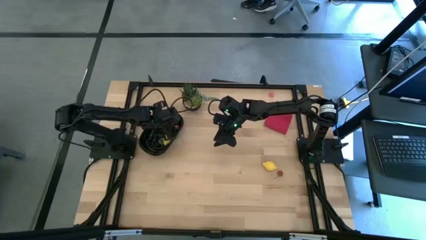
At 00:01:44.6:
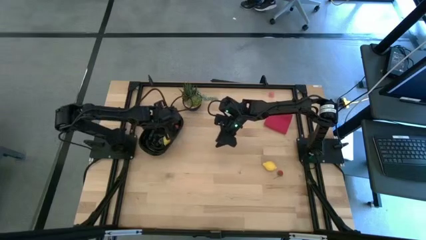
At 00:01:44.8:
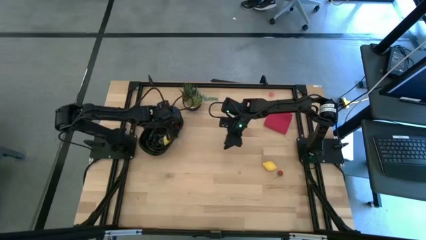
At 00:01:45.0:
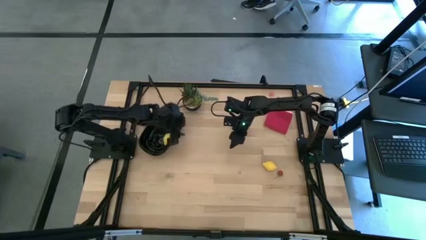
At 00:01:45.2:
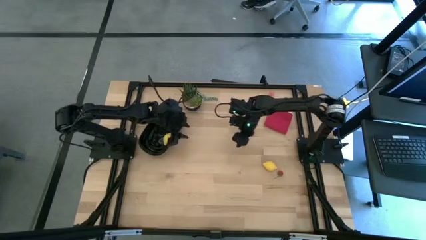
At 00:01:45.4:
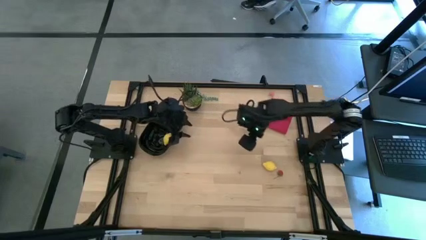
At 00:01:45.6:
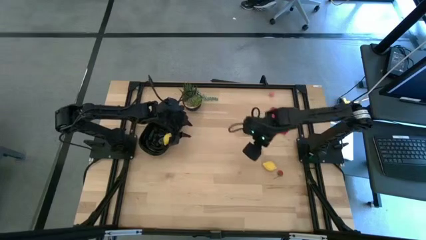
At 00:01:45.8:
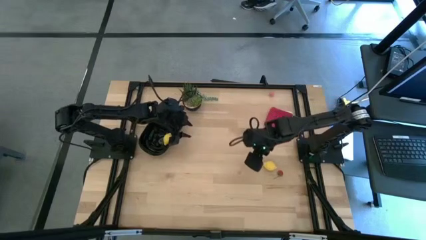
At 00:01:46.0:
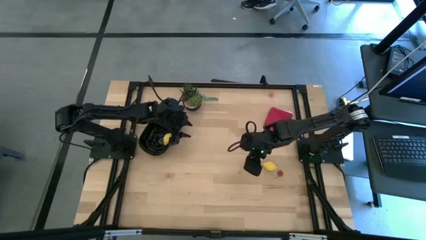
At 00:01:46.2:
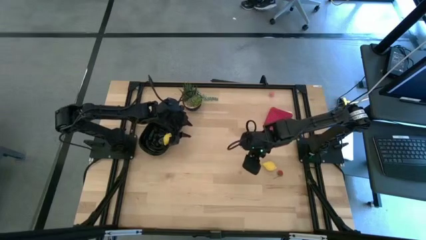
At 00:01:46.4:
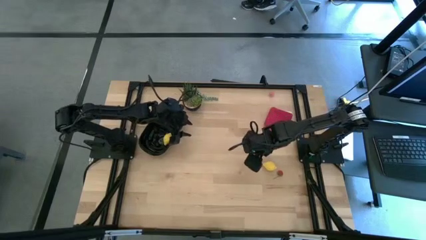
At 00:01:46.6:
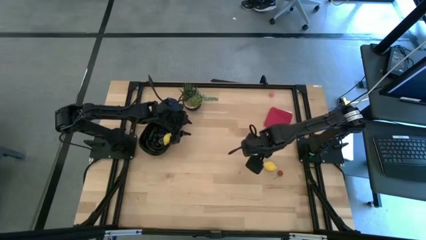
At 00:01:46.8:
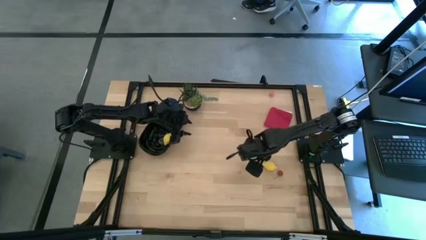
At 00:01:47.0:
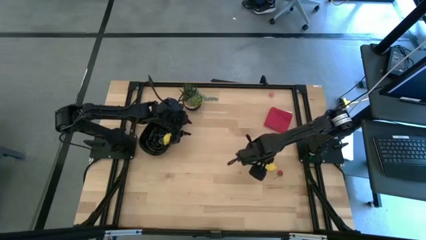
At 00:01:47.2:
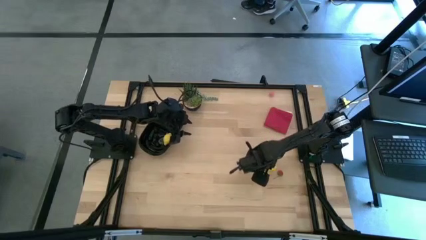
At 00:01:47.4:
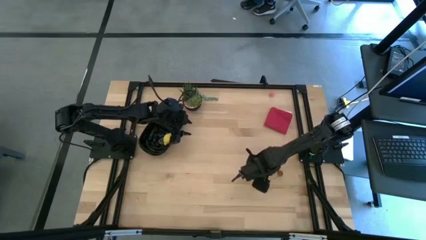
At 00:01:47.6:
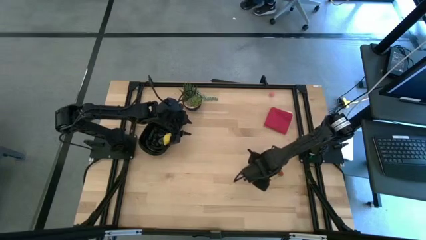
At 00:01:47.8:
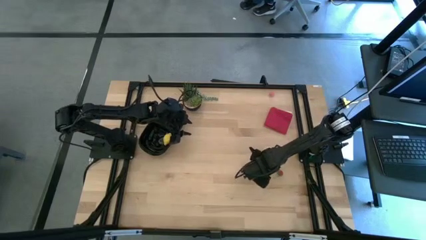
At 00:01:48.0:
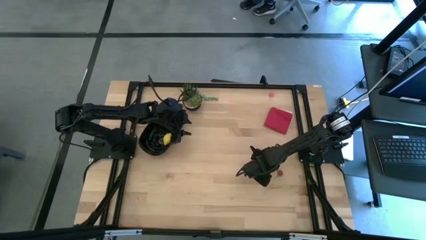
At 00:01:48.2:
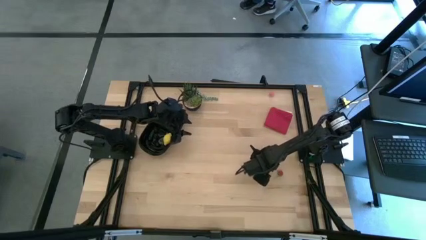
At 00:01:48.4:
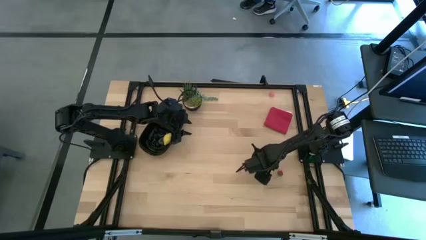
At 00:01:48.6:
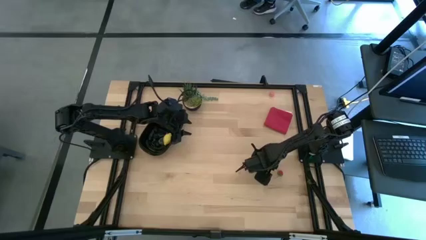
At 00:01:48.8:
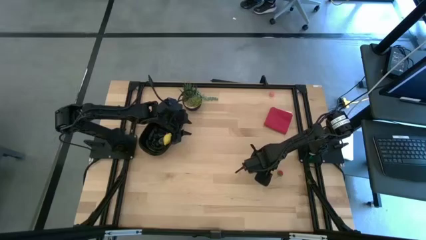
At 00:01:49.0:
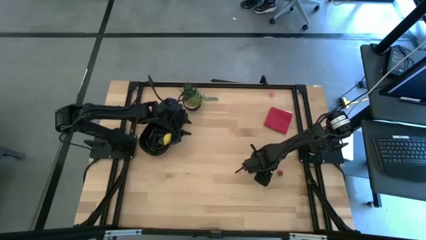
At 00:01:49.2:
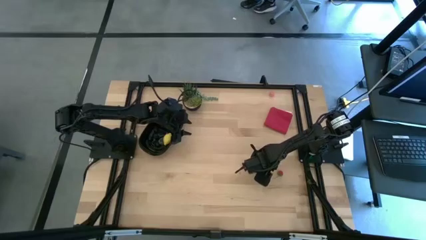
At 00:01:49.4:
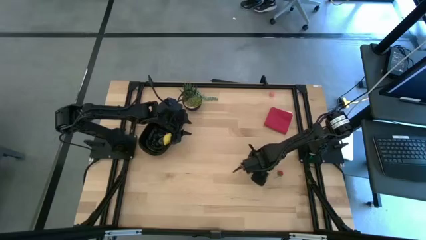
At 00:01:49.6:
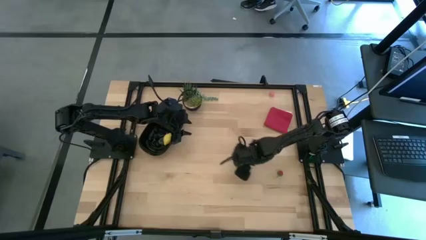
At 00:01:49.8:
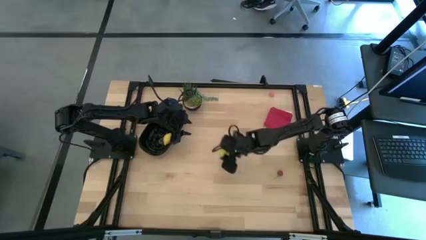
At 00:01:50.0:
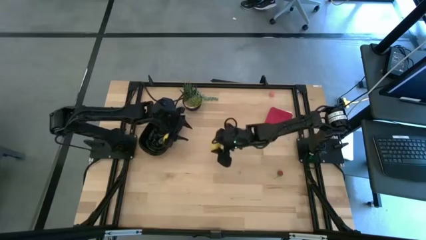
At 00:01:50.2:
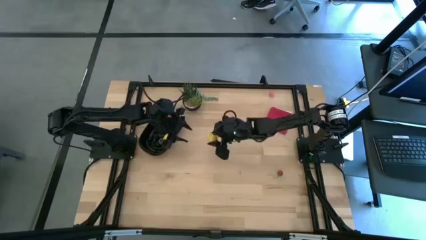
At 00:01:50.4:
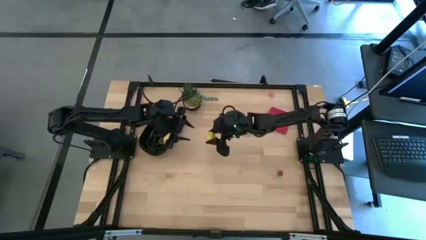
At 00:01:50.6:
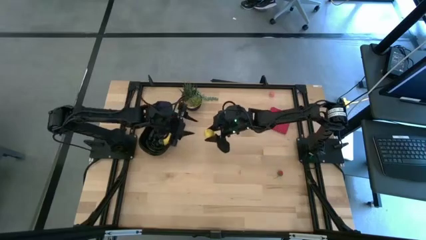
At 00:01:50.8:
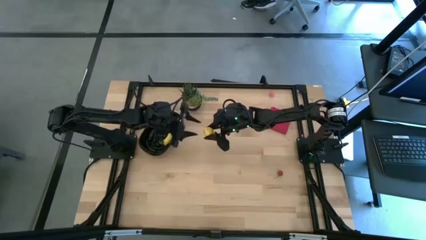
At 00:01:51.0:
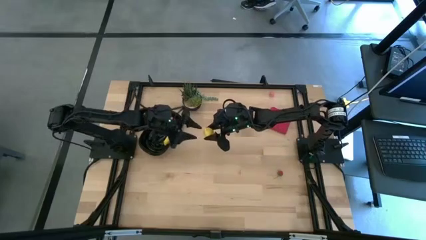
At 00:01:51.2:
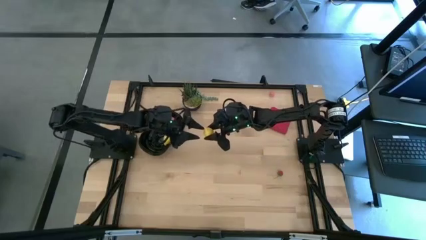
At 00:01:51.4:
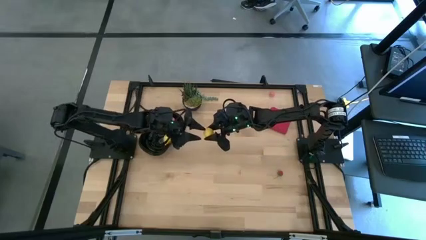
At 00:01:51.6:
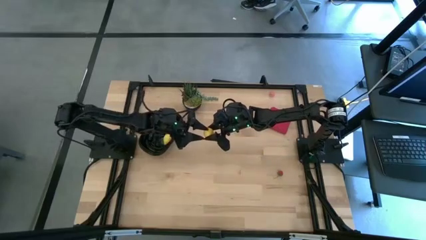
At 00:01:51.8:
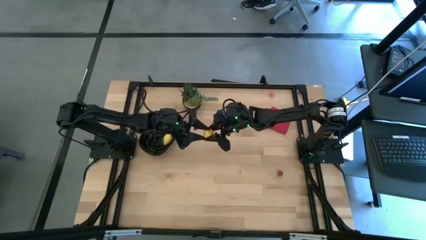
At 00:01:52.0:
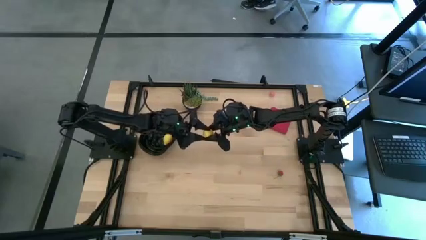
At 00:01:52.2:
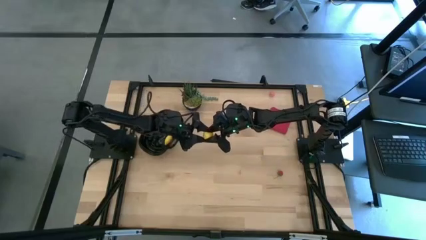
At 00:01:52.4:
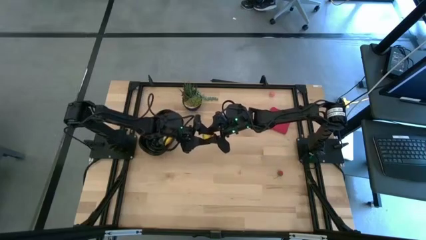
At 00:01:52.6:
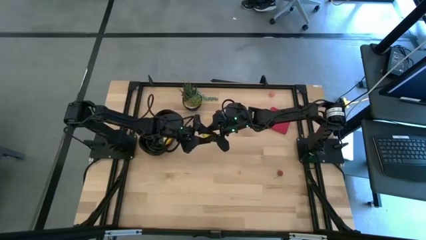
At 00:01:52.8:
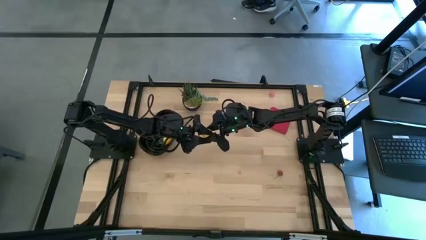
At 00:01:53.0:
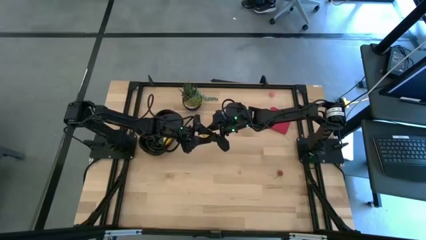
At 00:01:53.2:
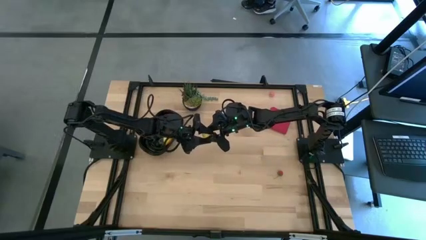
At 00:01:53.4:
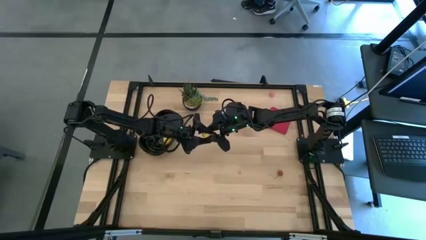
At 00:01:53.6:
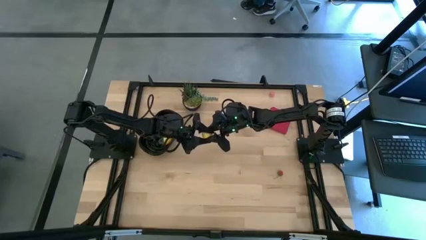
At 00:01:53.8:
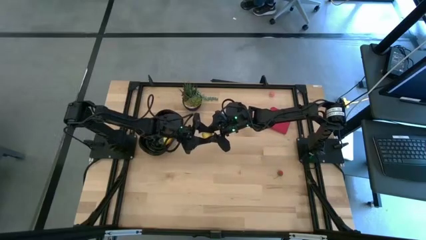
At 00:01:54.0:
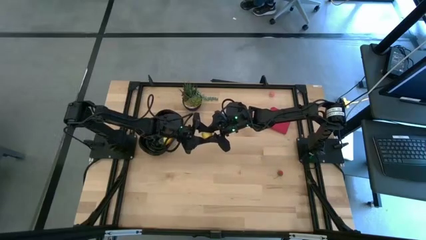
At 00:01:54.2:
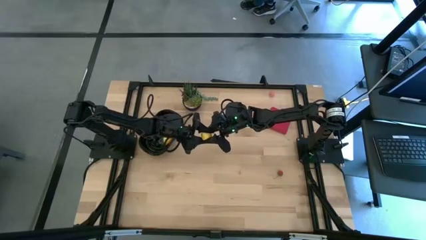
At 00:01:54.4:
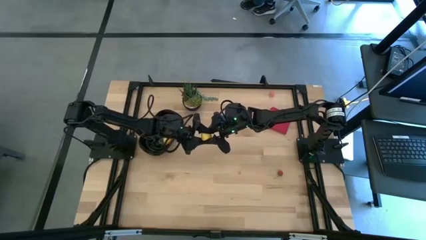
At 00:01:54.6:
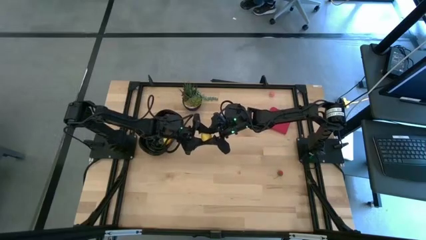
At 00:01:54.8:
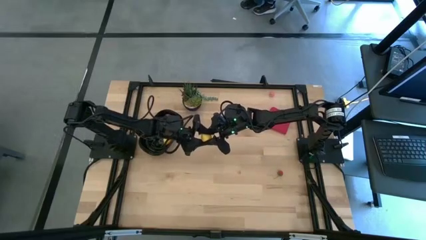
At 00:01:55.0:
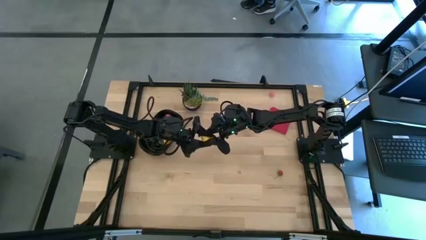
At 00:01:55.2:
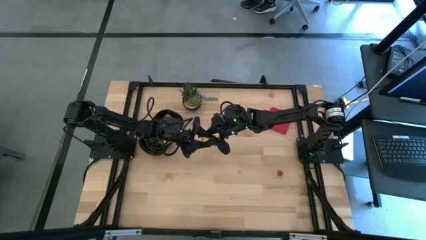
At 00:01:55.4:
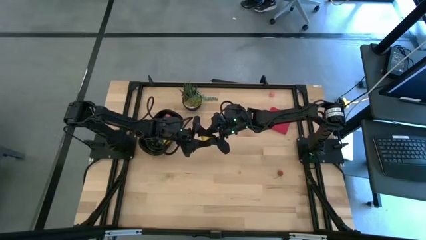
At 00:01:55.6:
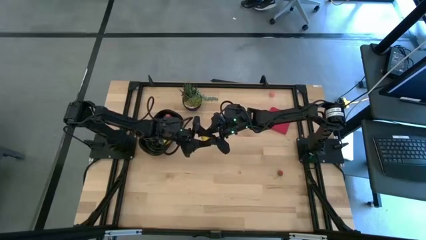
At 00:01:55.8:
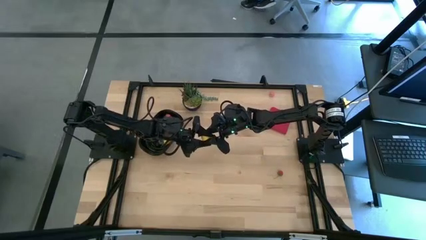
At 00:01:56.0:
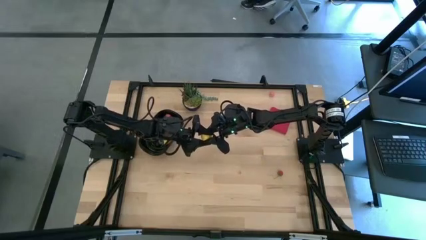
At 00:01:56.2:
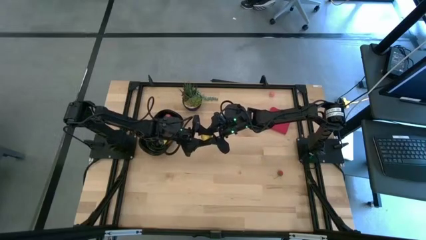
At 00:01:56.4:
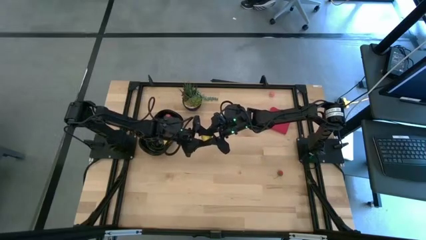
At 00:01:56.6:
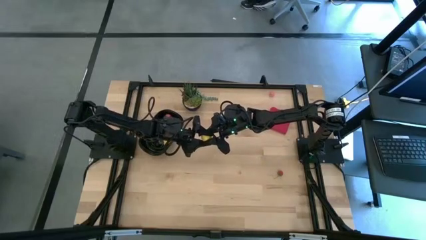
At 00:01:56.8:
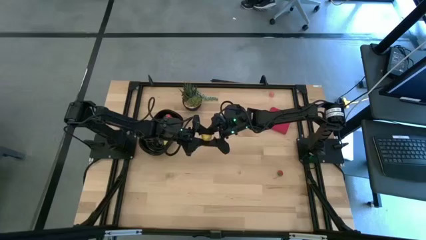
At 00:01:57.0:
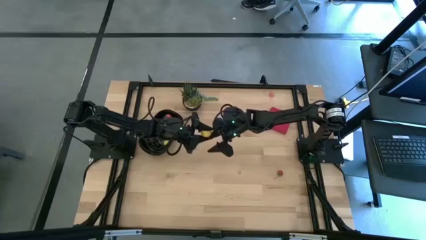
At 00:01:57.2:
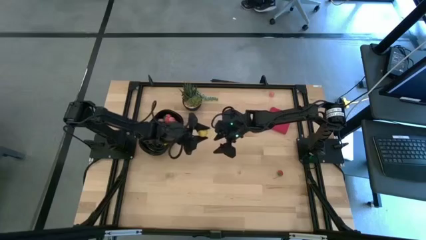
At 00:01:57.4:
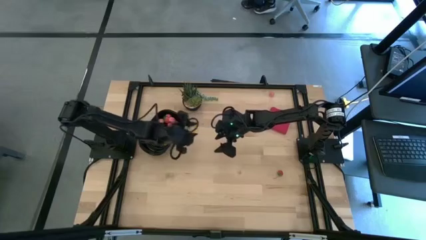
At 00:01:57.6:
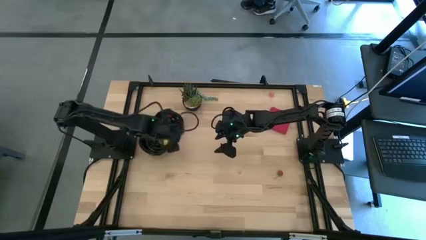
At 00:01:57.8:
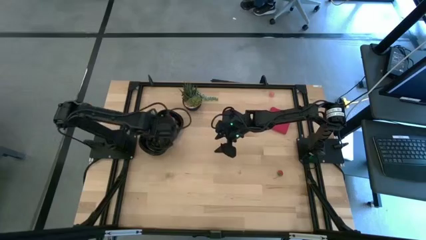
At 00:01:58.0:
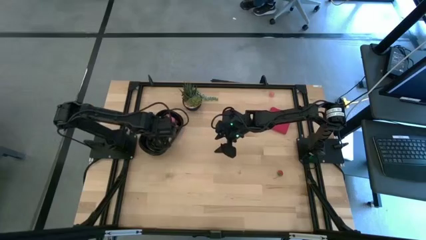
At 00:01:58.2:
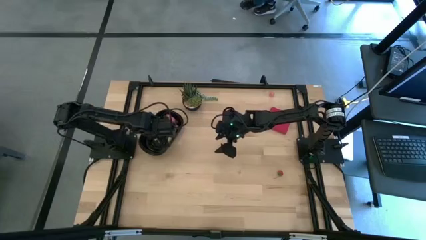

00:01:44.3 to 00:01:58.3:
Task: Pick and placing Produce into tupperware
Put the yellow lemon into the black container
